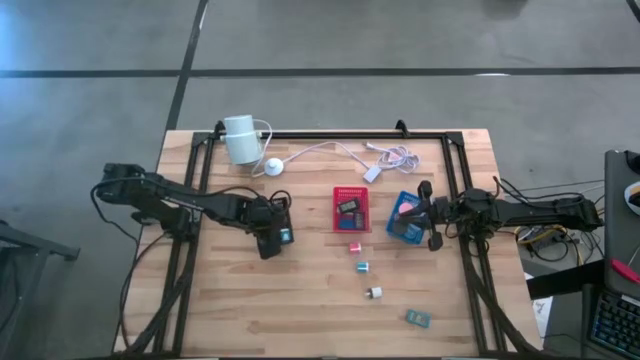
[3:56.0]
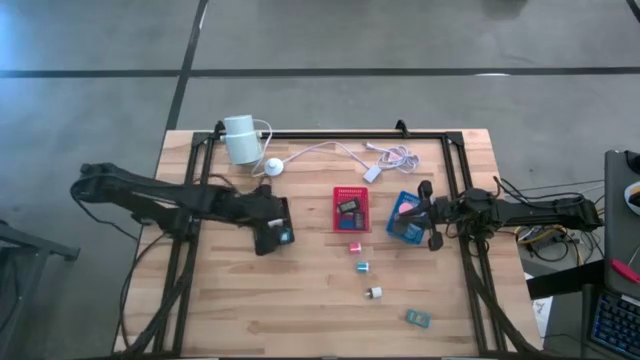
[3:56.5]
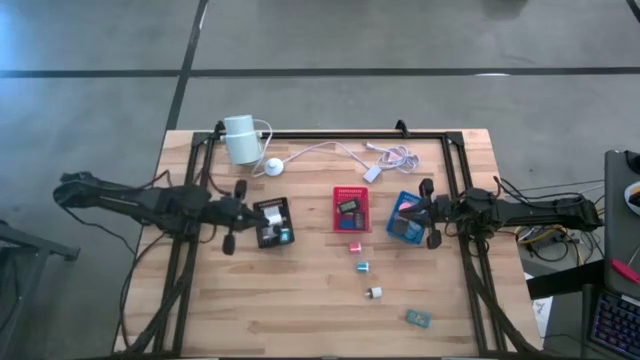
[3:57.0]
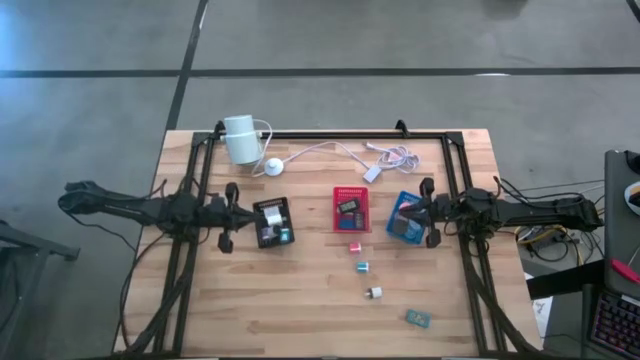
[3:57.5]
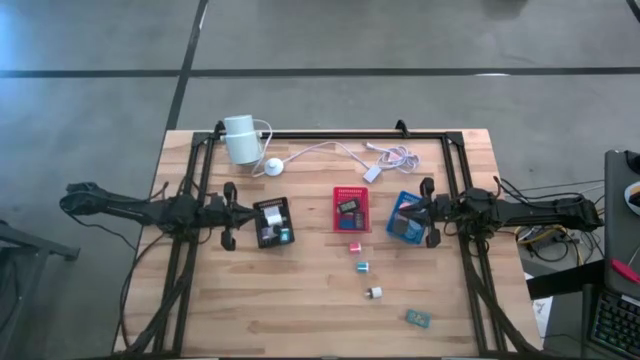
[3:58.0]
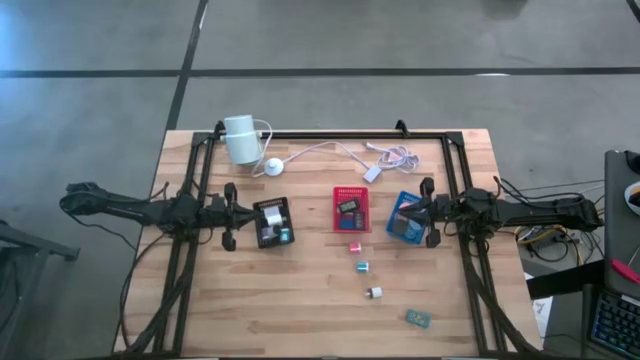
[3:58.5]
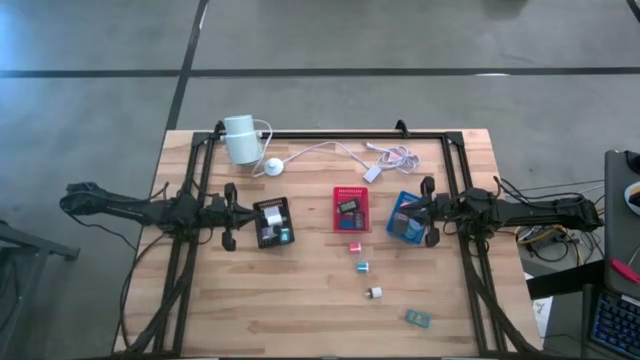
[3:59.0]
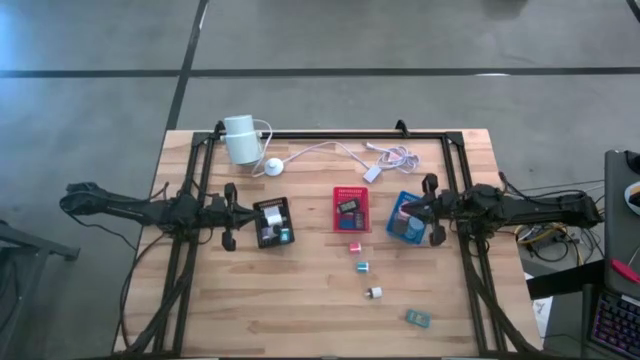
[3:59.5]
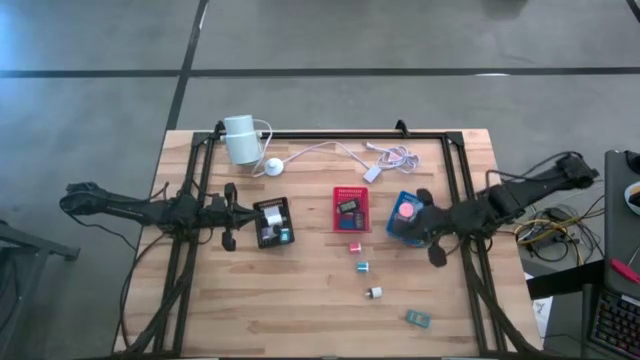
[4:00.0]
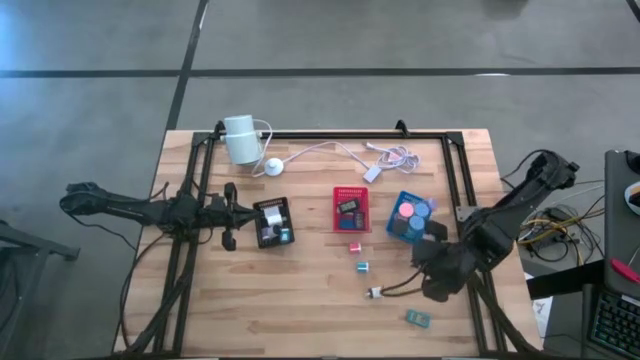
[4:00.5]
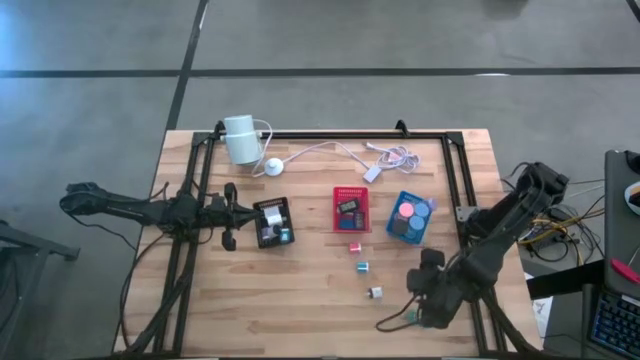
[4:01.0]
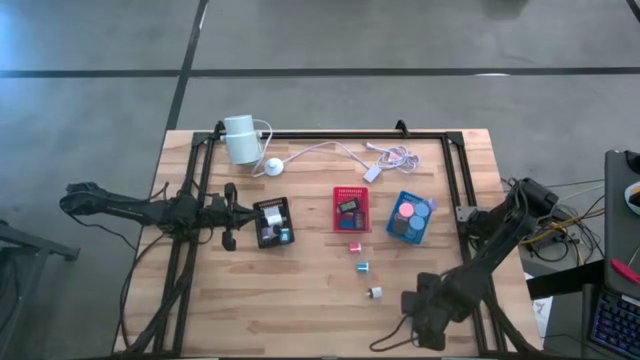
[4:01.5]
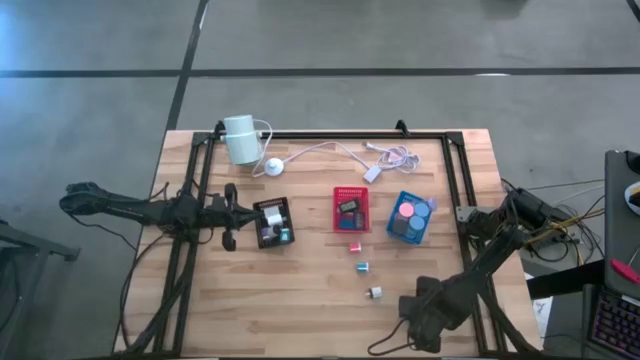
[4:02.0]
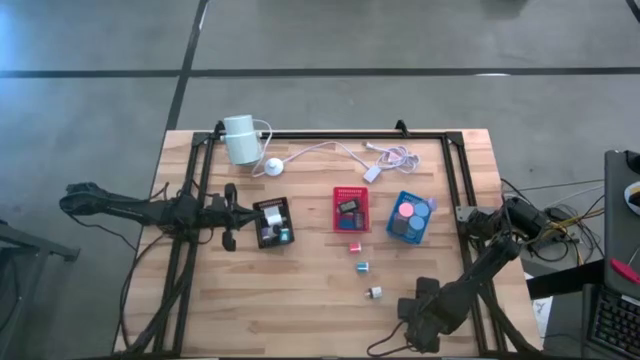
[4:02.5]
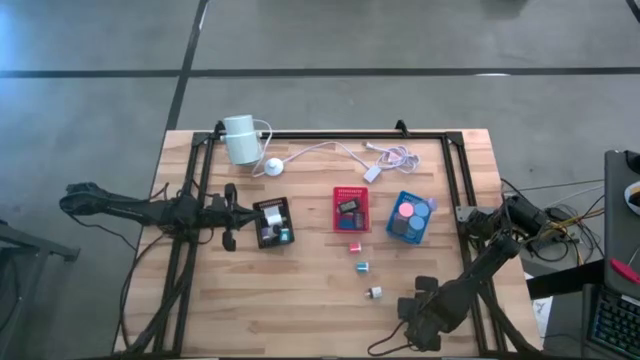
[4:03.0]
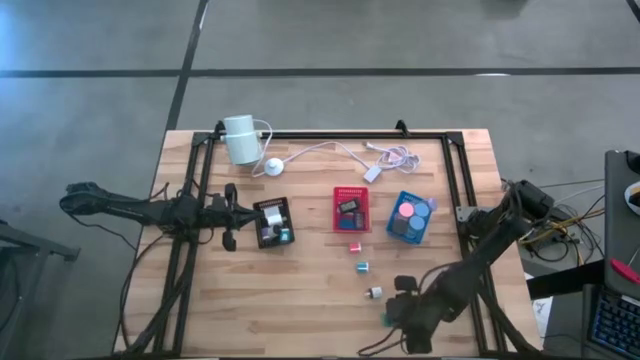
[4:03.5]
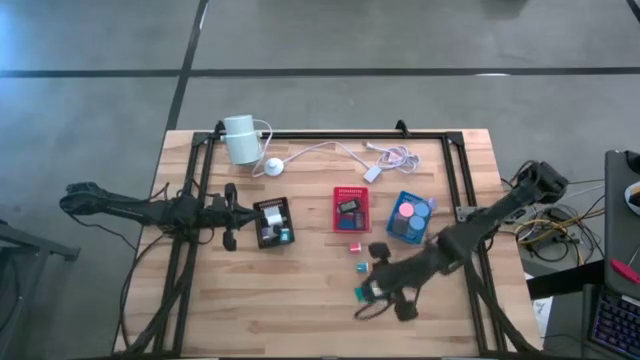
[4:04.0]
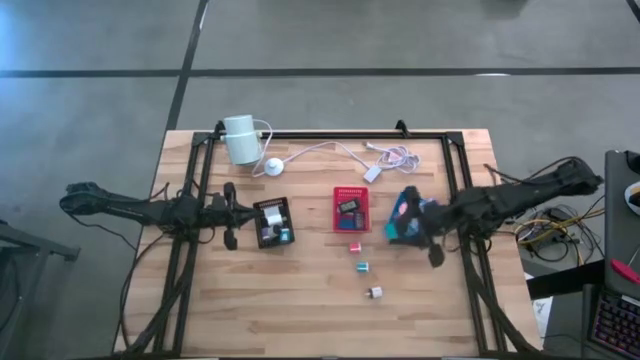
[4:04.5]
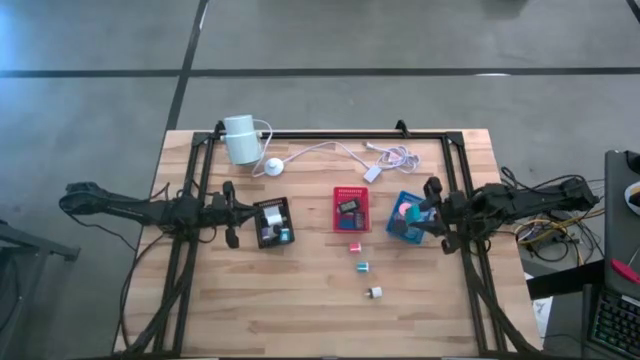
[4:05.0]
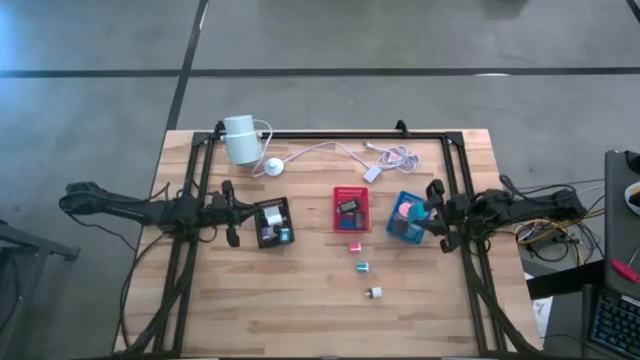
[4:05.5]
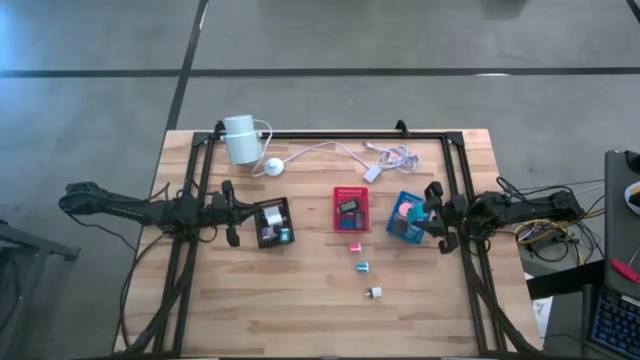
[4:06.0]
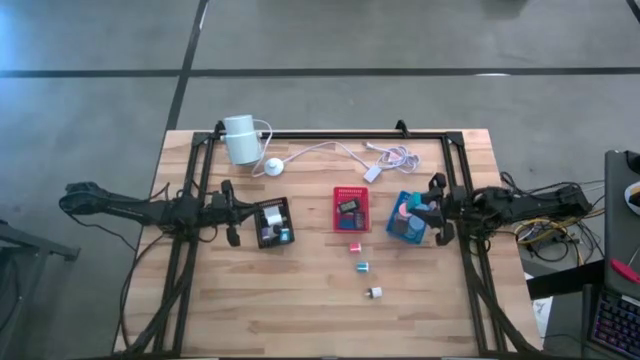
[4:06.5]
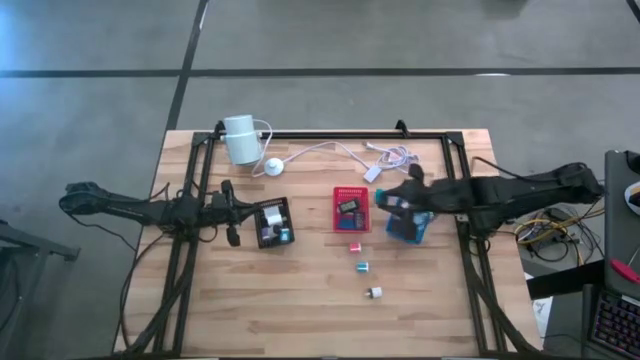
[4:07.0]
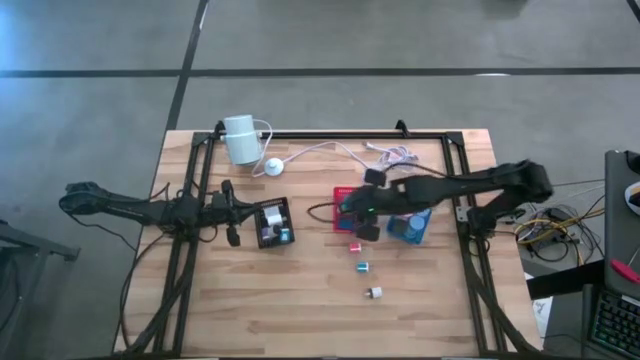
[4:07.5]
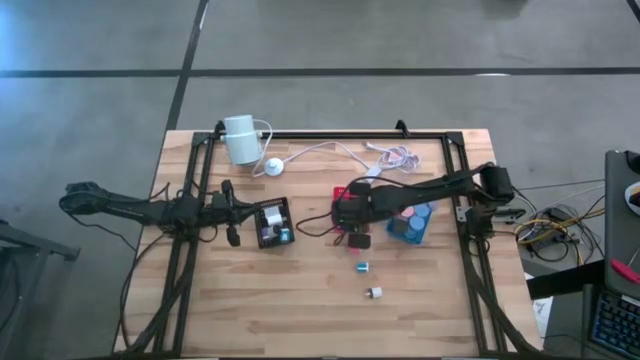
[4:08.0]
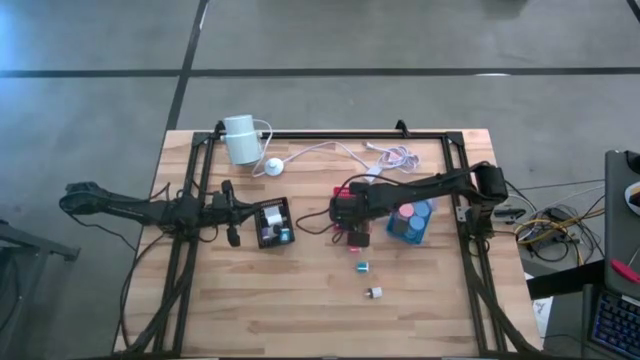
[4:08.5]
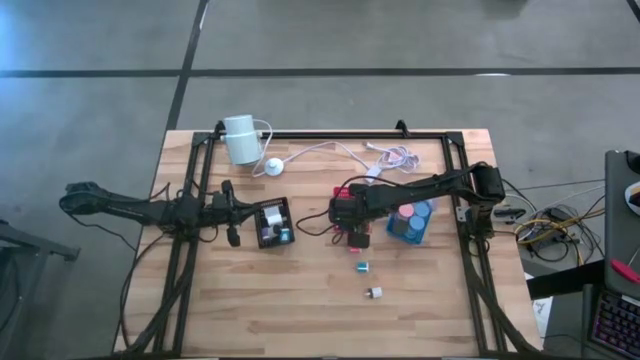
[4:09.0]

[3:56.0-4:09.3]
Task: Pick & Place Office items
Put the light blue digital clock into the red bin

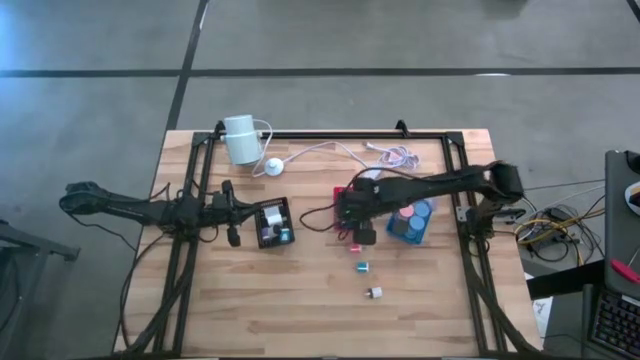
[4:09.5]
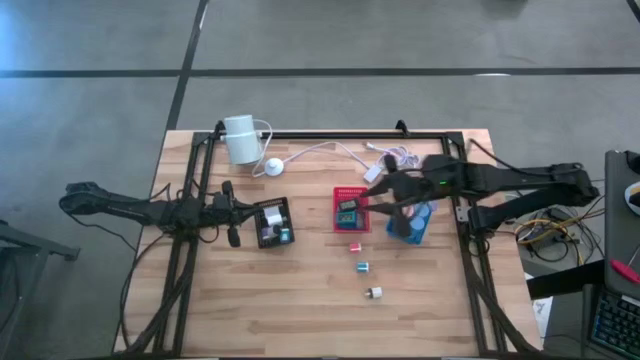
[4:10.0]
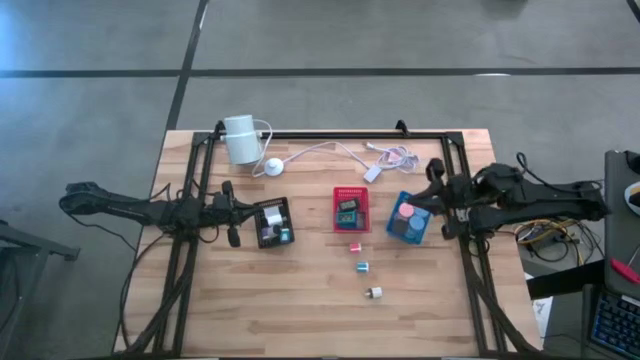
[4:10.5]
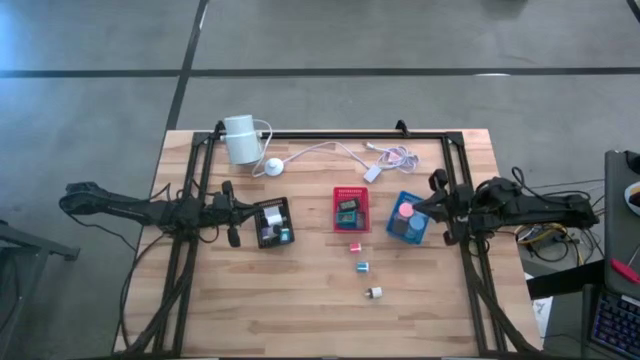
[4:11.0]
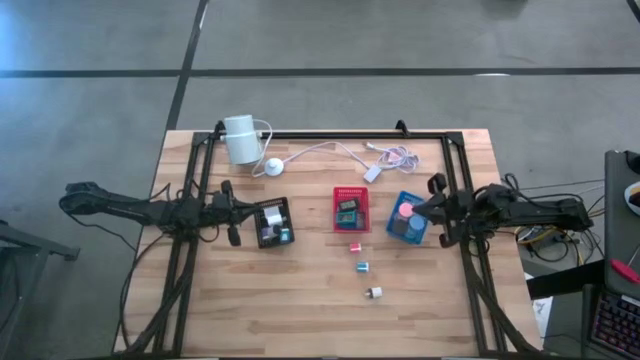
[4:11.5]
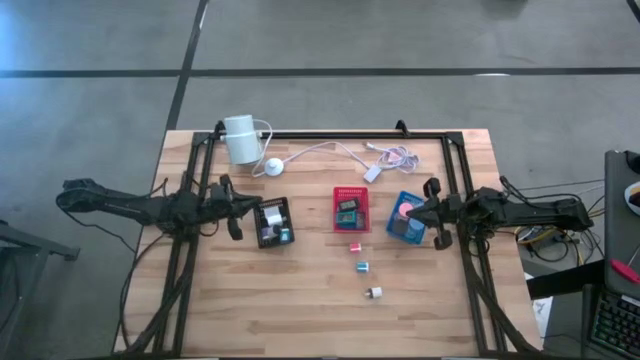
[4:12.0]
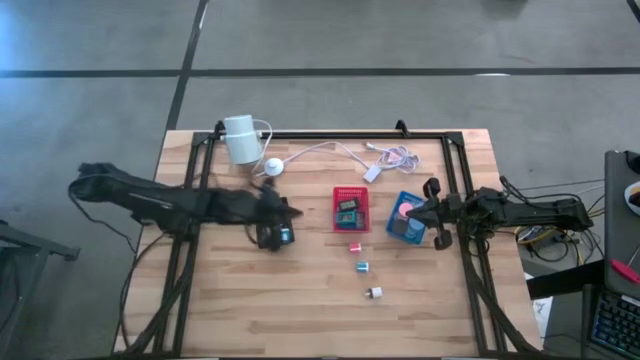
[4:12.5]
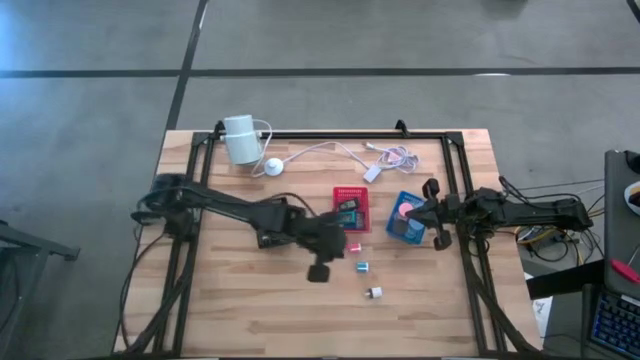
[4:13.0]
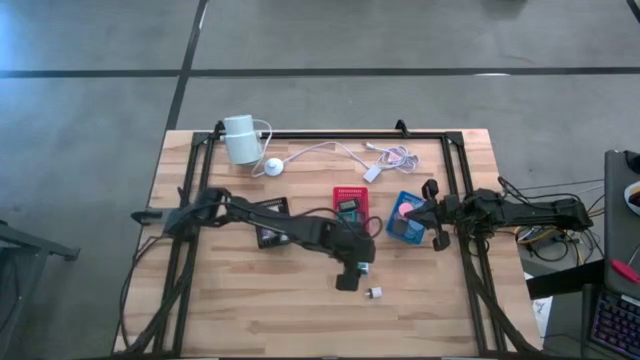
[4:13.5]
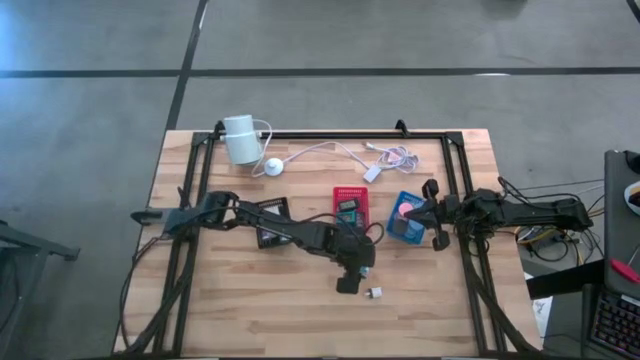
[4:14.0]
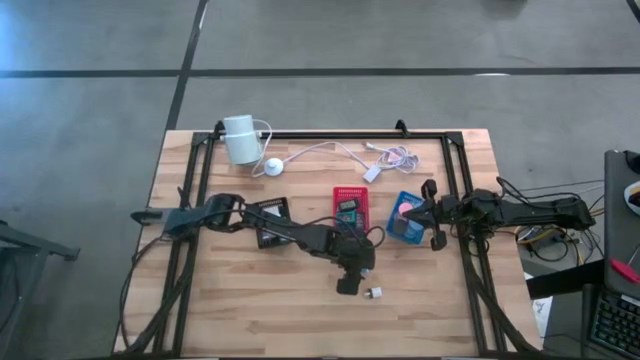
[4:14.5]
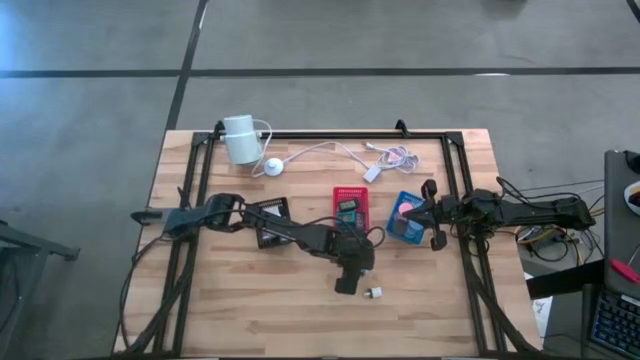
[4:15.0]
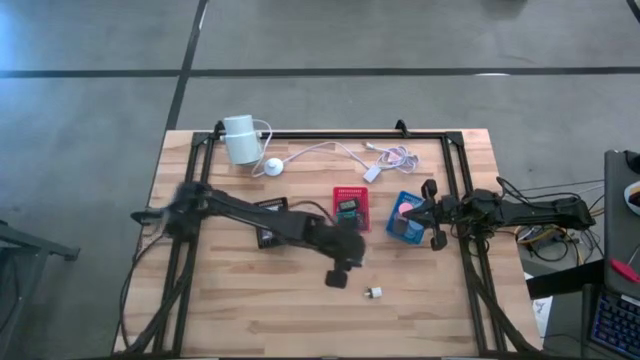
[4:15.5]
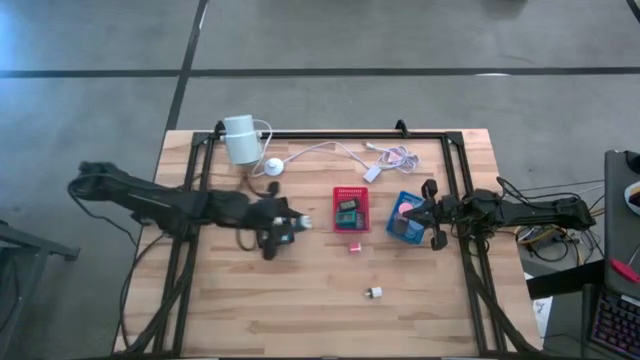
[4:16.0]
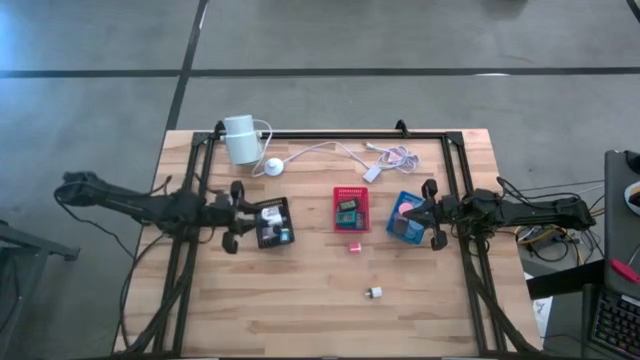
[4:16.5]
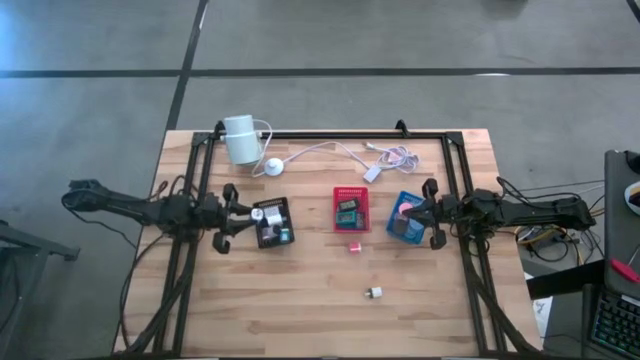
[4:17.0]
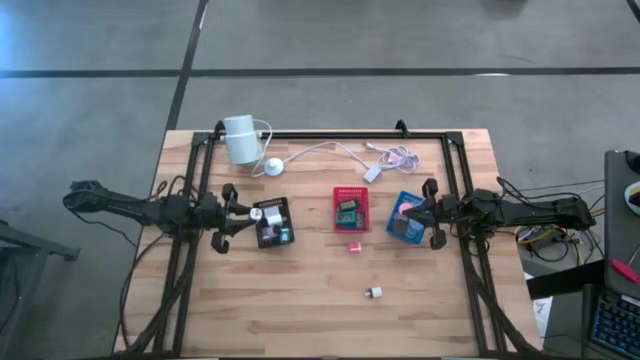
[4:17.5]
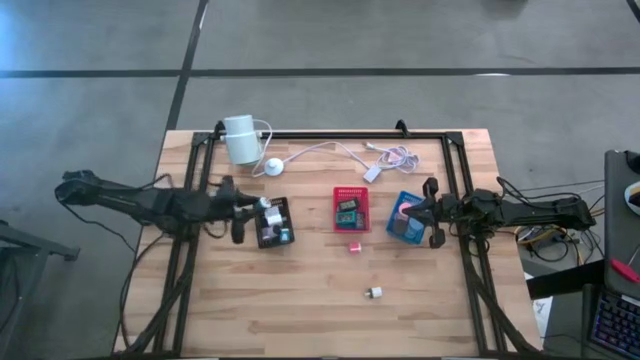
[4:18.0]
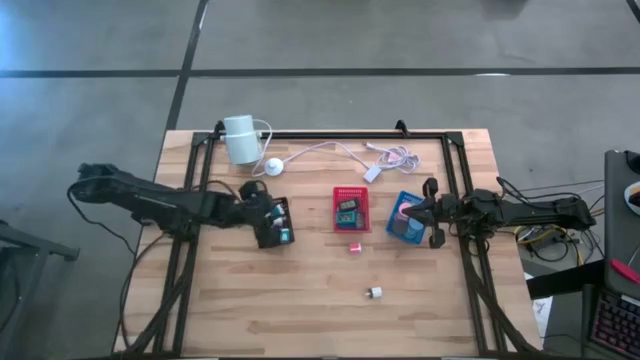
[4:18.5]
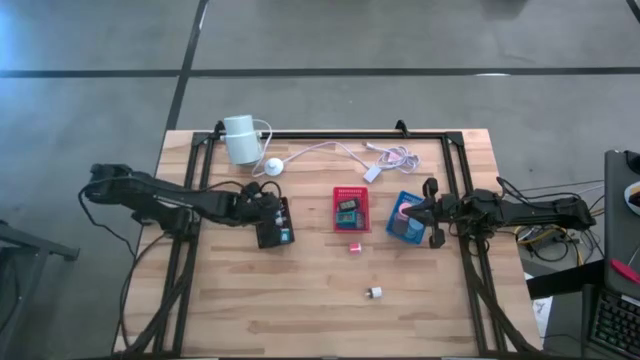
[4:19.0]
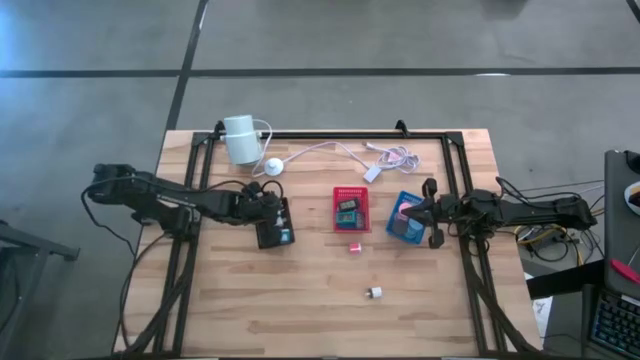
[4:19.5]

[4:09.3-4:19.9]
Put the light blue charger adapter into the black bin
